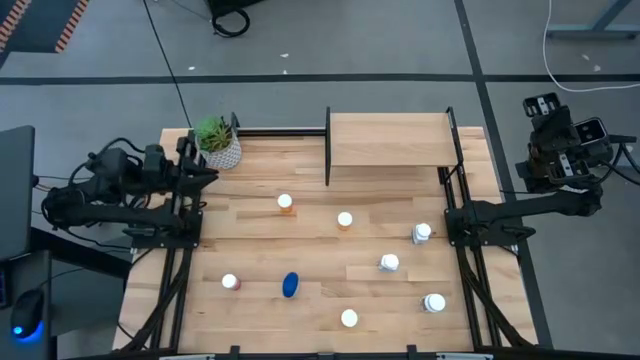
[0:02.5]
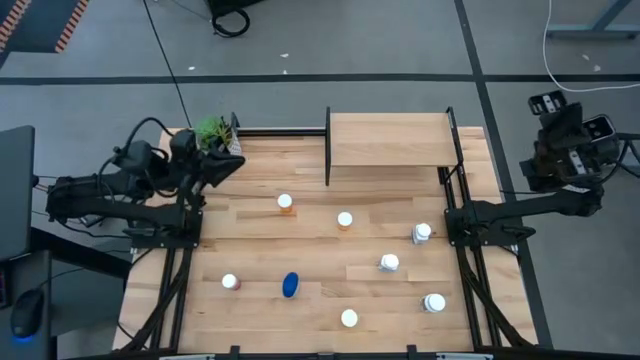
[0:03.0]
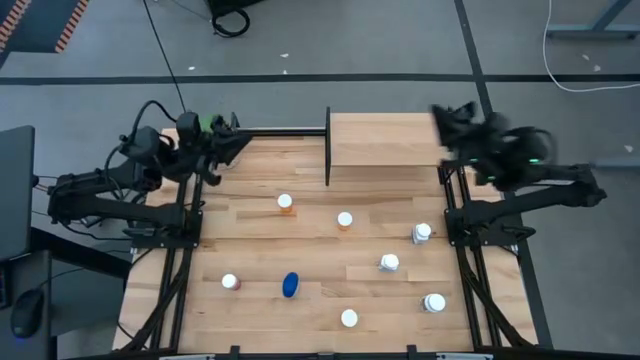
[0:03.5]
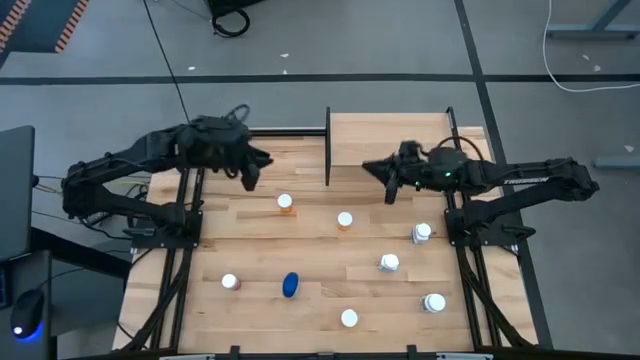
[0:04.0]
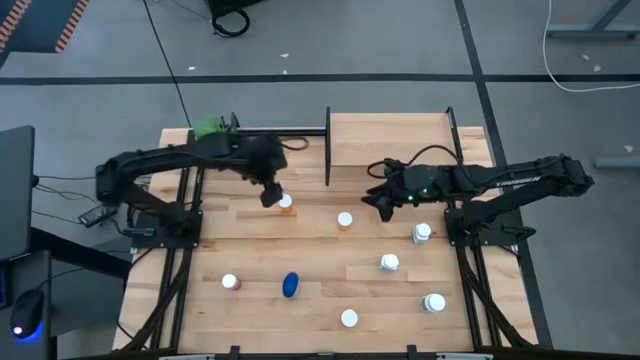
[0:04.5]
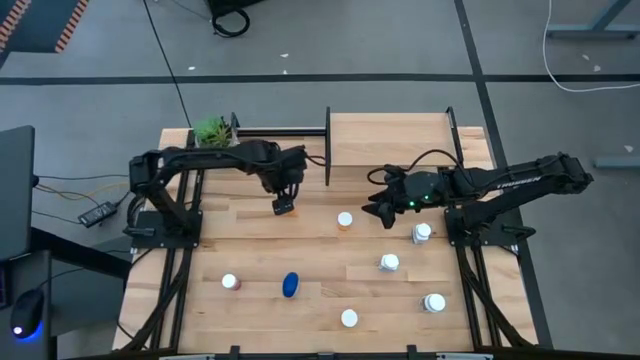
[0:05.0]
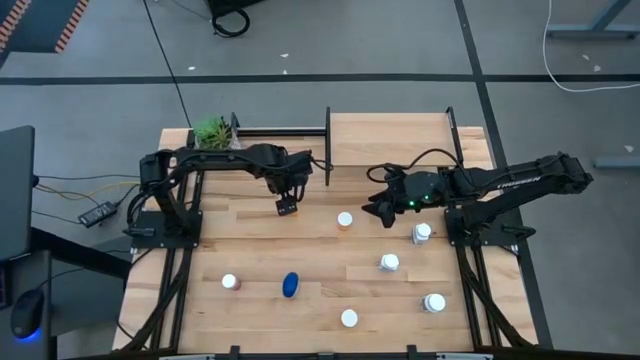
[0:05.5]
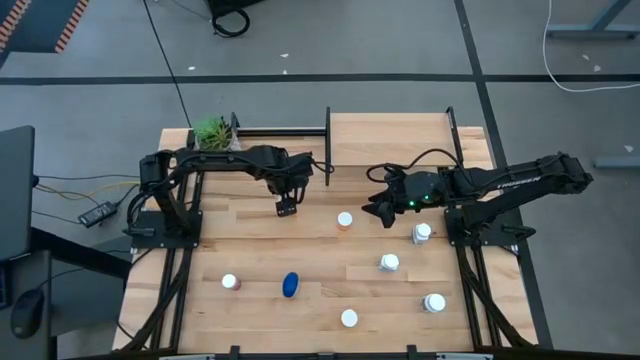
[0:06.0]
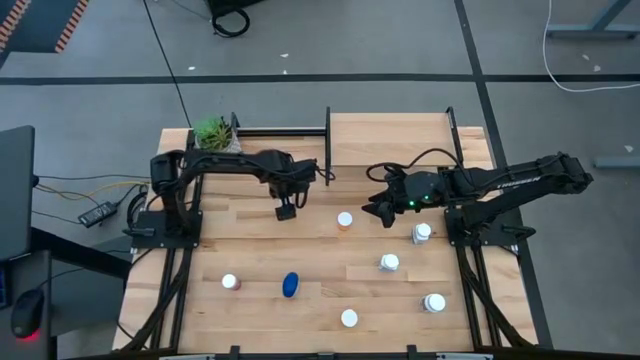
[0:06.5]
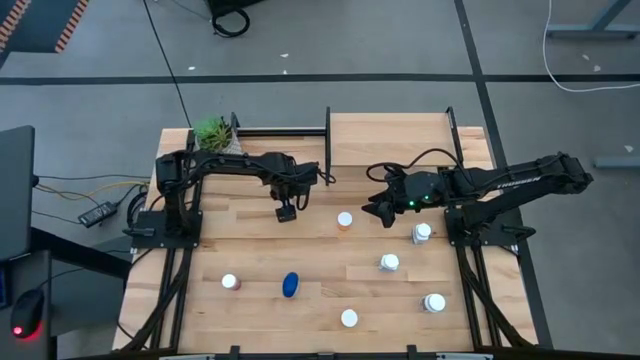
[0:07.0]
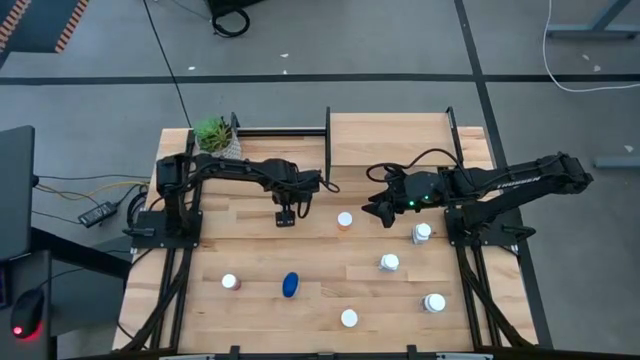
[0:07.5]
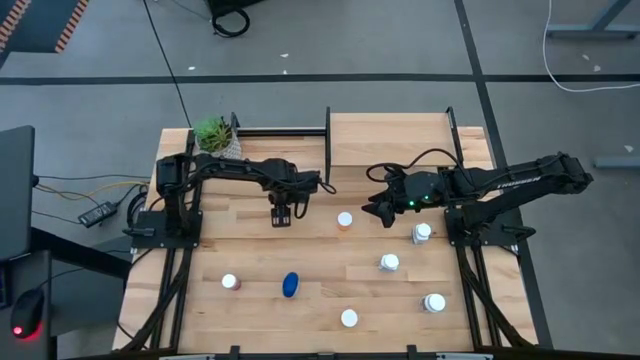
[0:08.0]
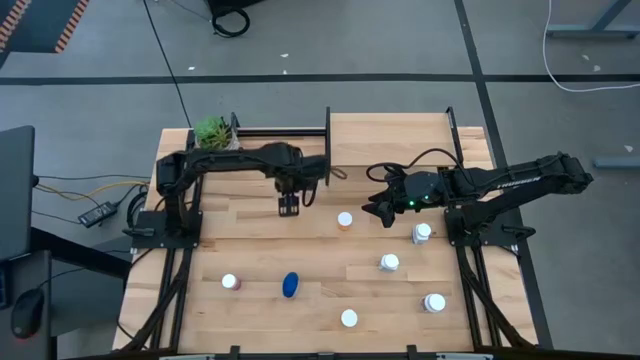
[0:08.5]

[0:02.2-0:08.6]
Task: Pick and place medicine bottles onto shelf by color
Put the left orange pill bottle on the shelf

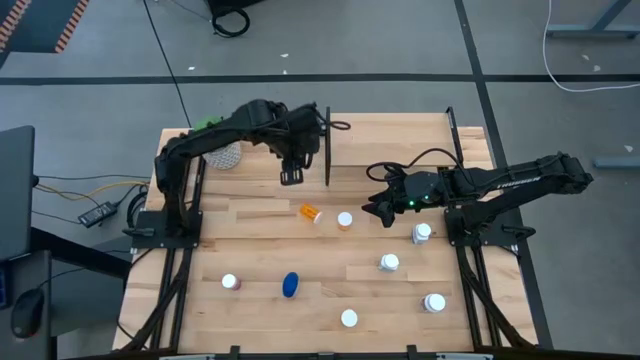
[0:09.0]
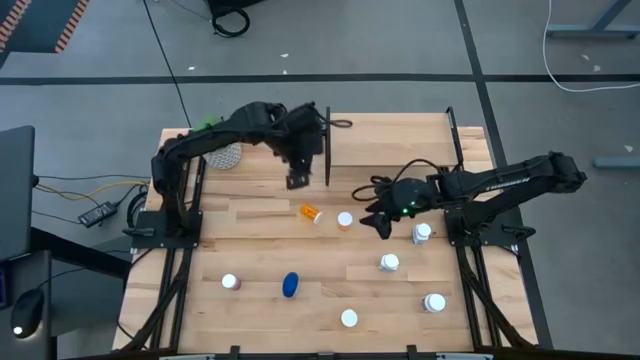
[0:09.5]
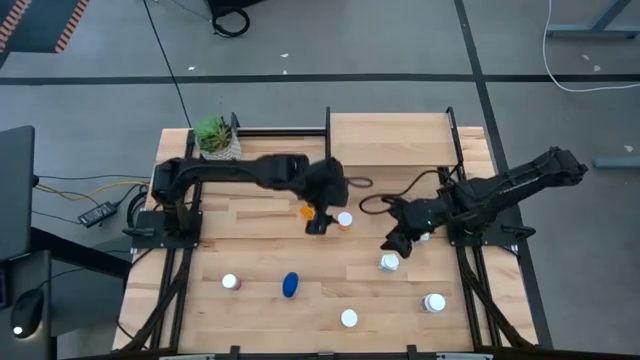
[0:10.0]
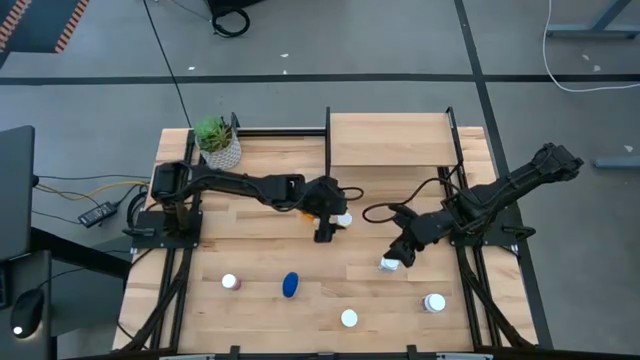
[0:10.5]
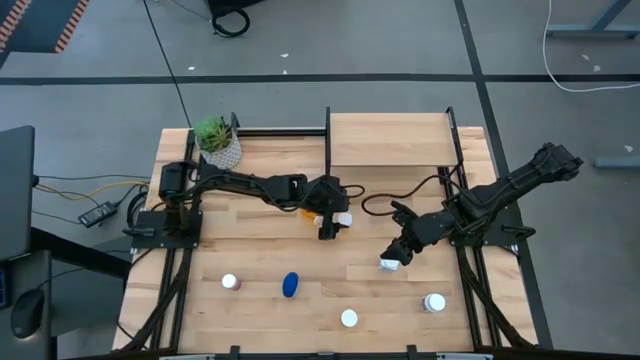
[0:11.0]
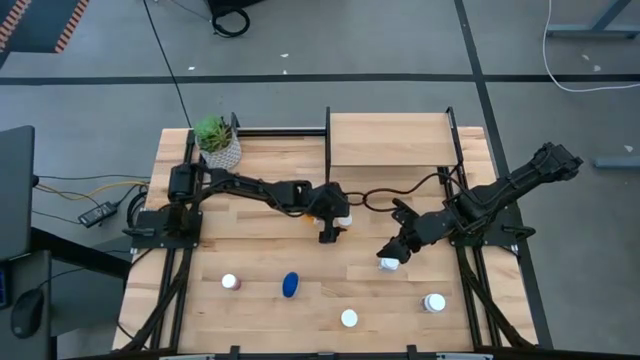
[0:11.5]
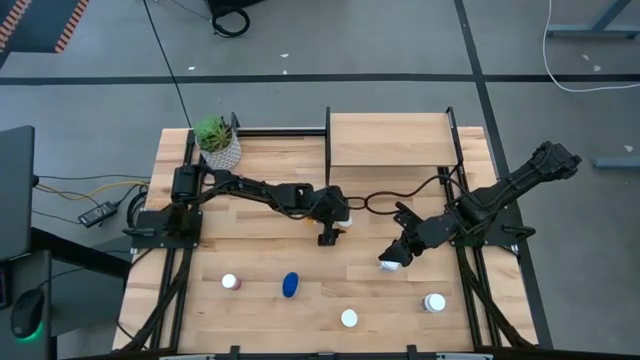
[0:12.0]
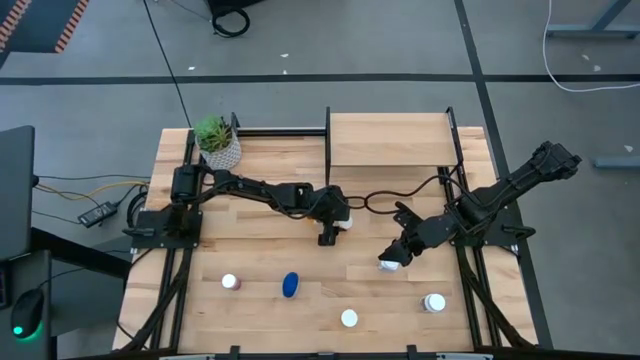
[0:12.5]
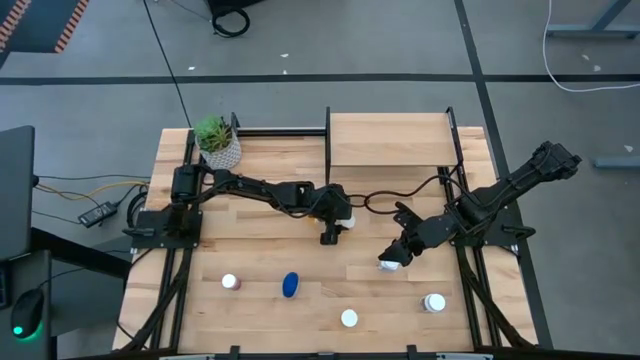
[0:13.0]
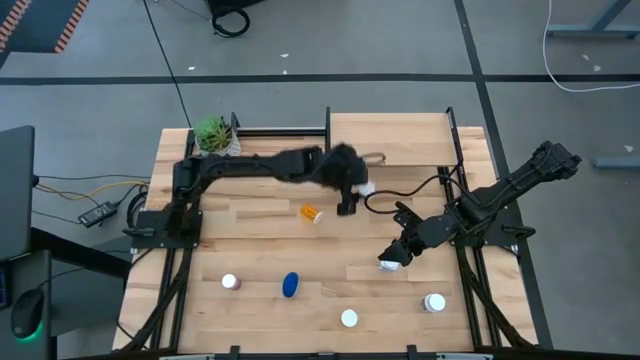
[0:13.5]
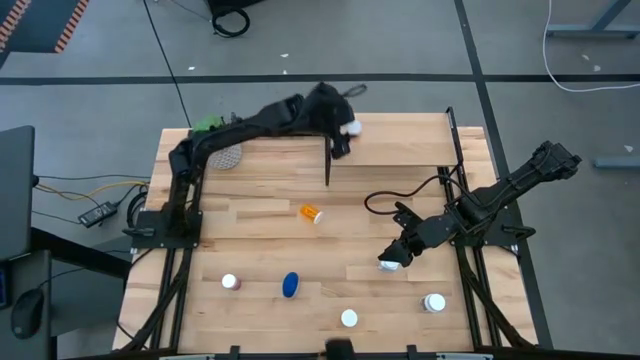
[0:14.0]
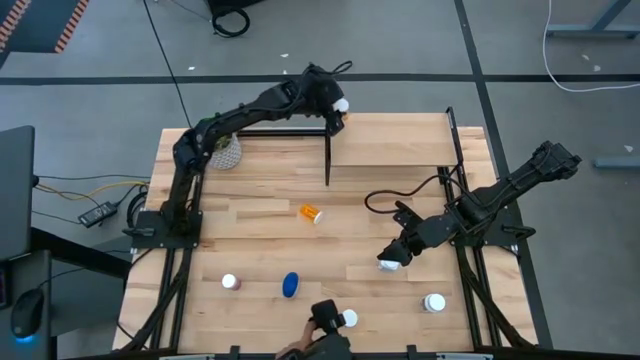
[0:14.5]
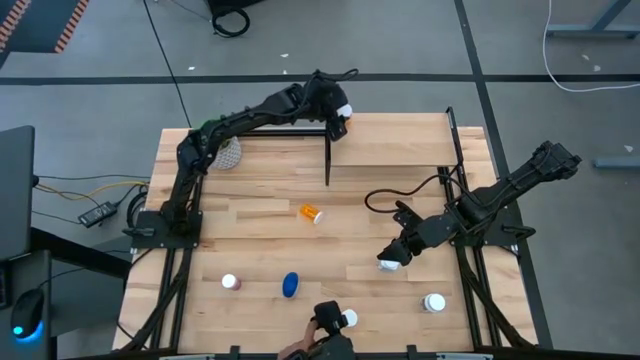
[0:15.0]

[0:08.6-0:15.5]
Put the top right orange pill bottle on the shelf

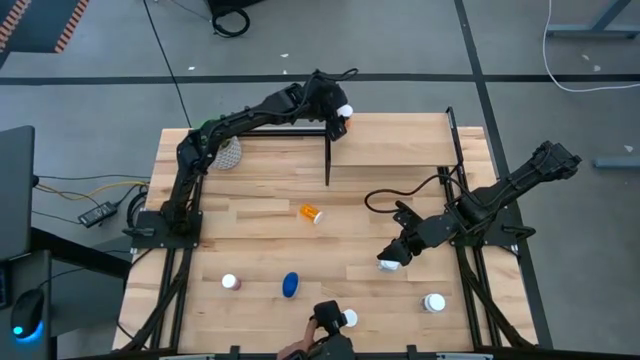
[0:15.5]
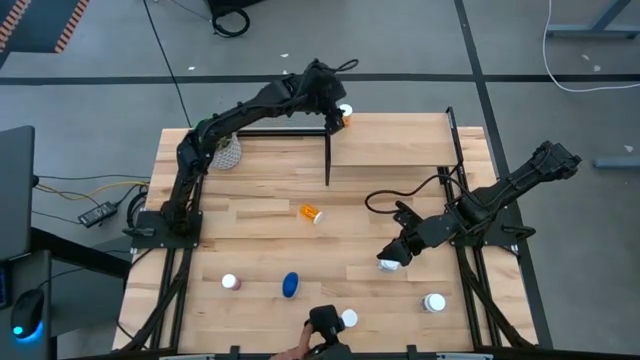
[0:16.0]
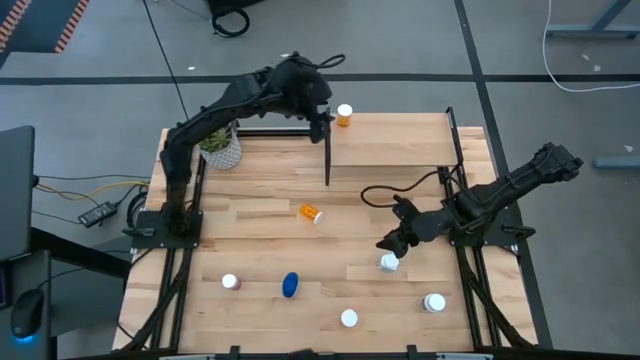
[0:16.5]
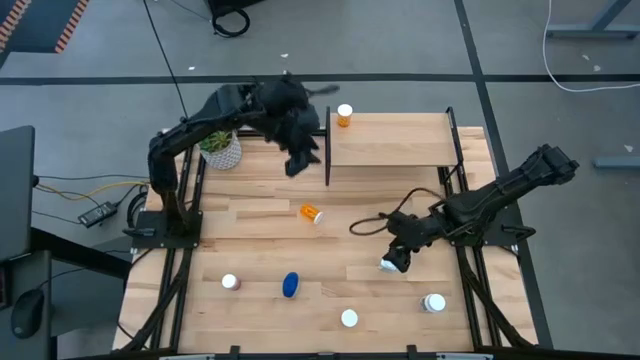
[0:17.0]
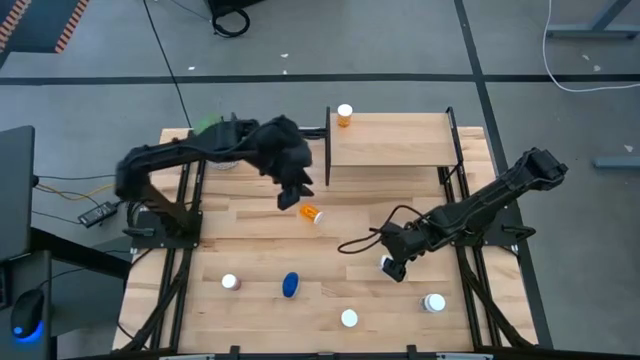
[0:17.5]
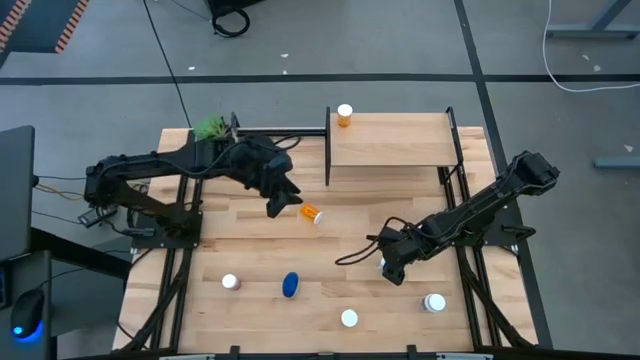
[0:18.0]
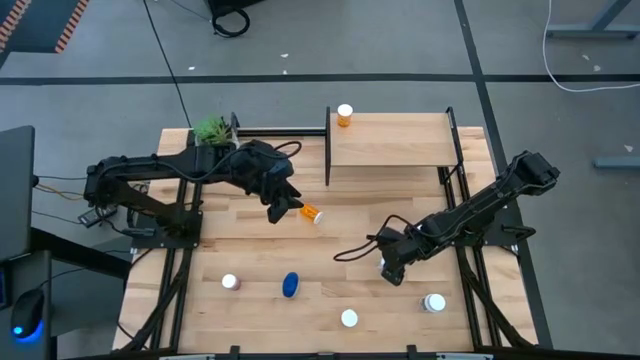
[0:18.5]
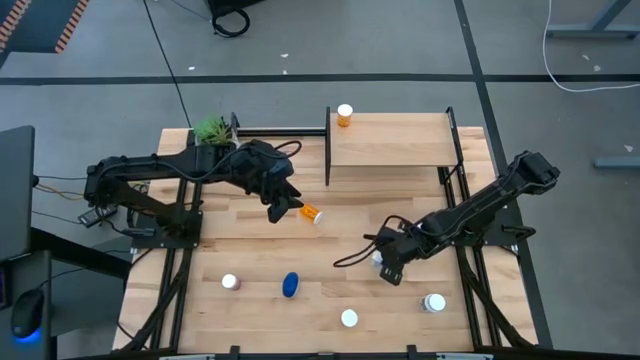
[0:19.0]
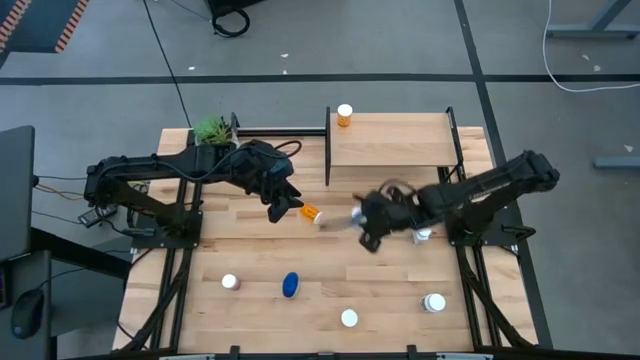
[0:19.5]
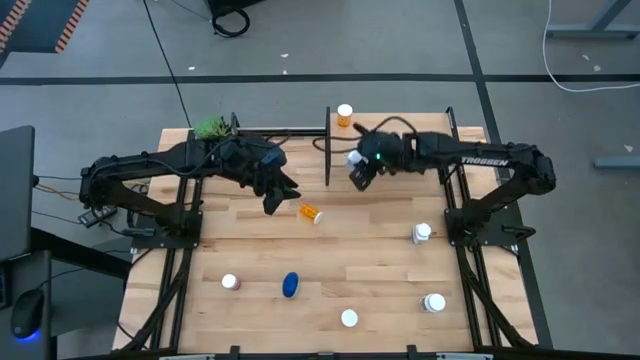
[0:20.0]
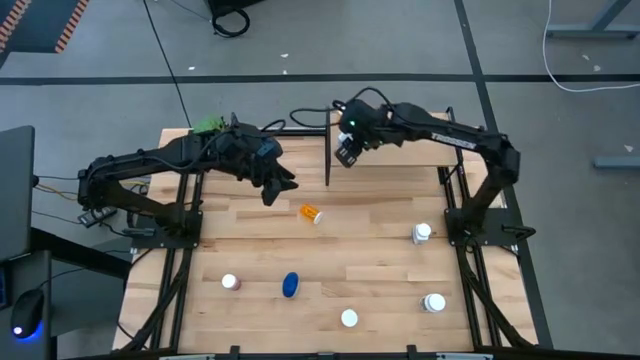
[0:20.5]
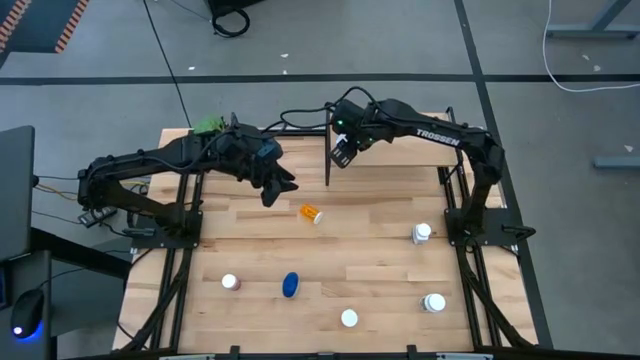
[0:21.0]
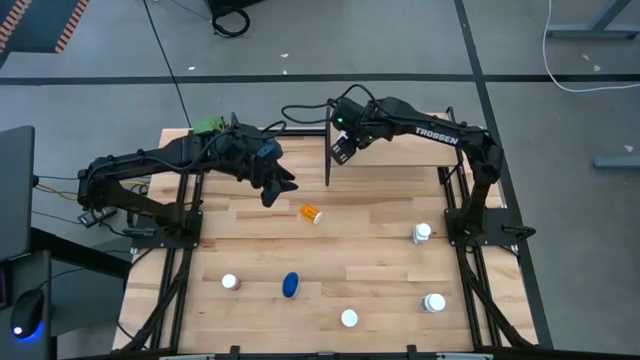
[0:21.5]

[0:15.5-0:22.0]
Put the left white blue pill bottle on the shelf aligned with the orange pill bottle

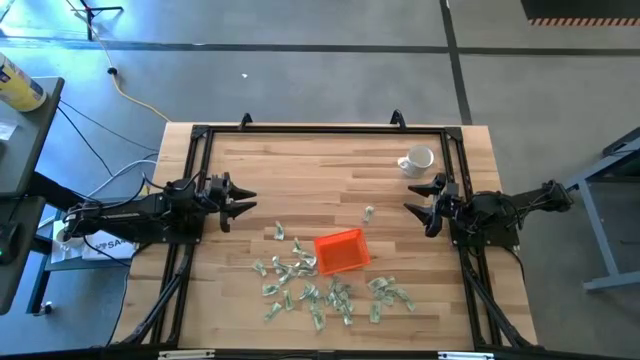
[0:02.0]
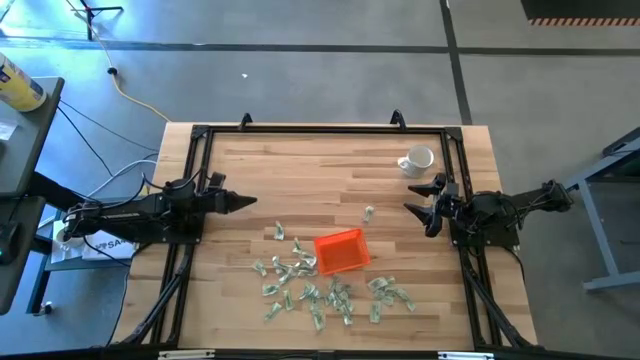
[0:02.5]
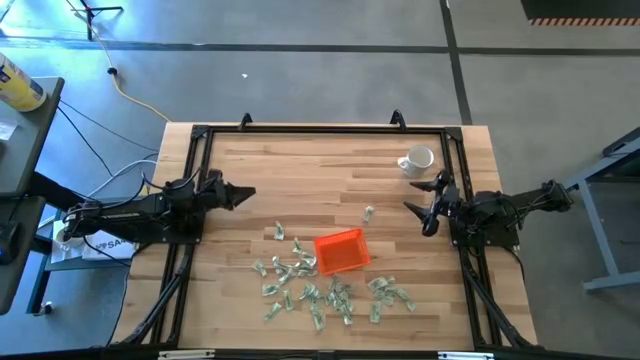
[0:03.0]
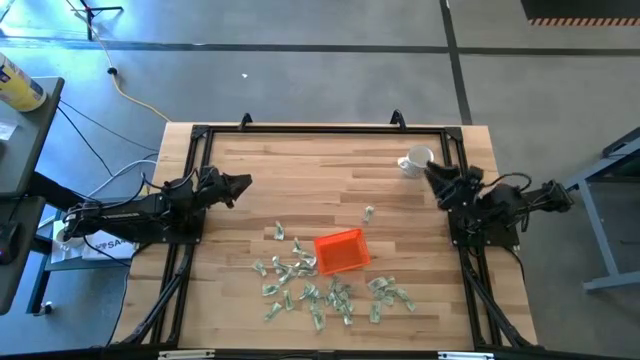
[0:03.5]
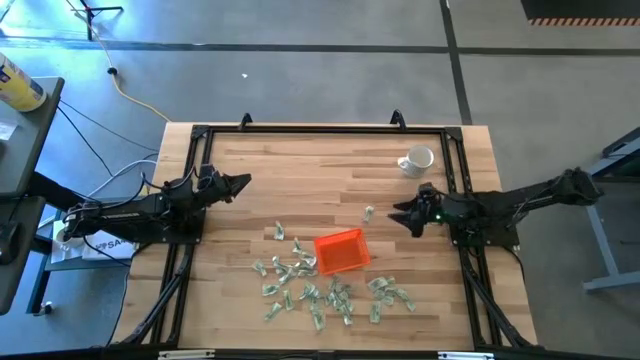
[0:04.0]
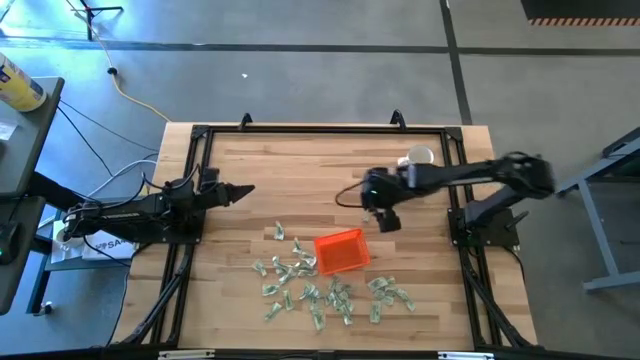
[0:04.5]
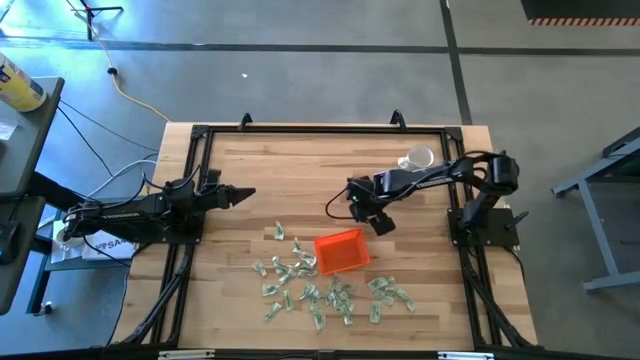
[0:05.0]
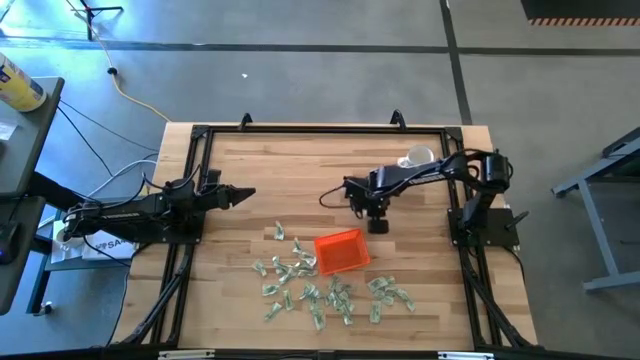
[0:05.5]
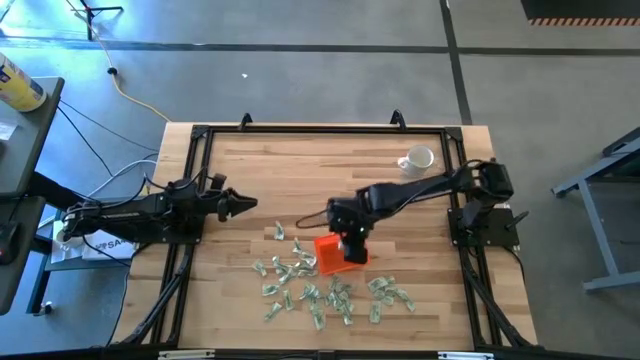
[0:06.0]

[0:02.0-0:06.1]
Task: Pick and place Stevia / Truvia into bins
Put the stevia packet into the orange bin
